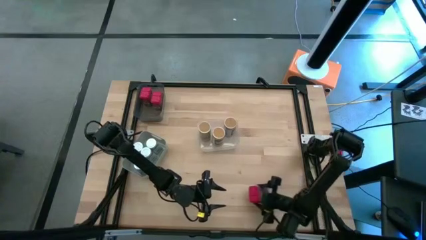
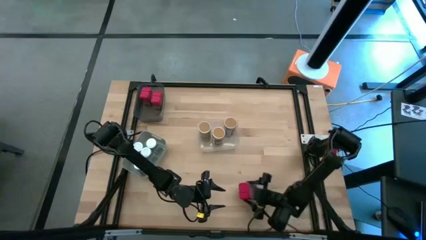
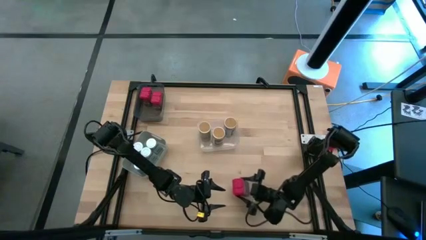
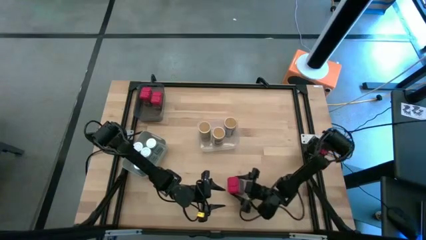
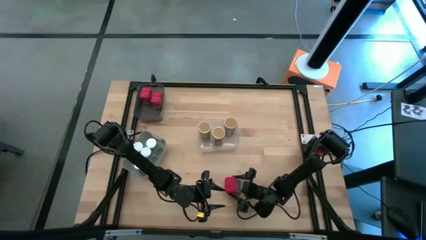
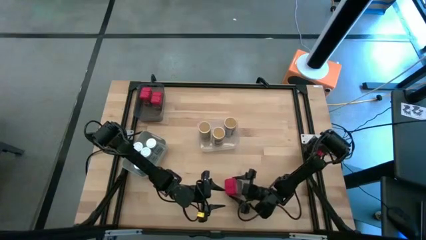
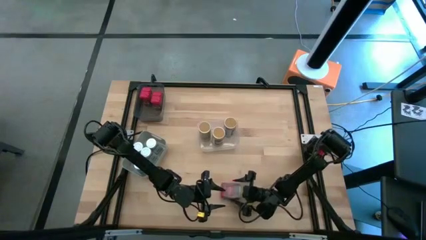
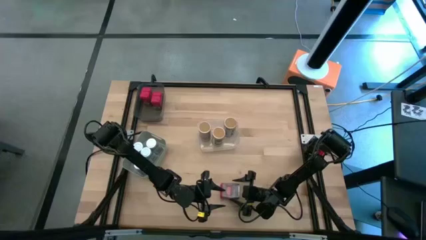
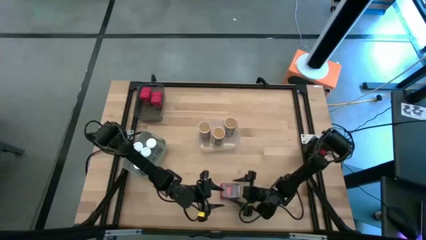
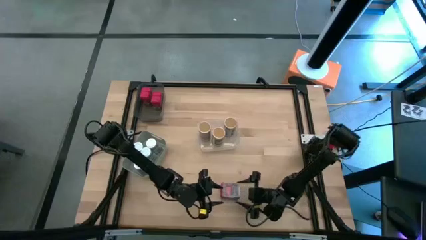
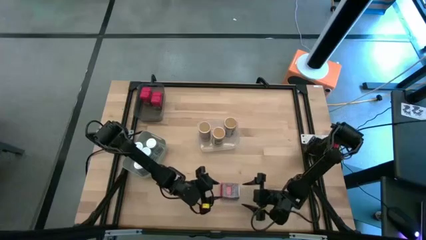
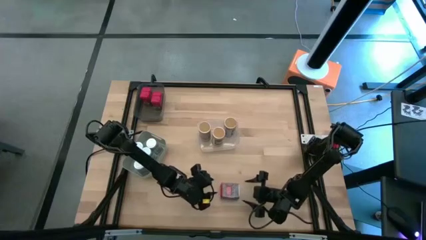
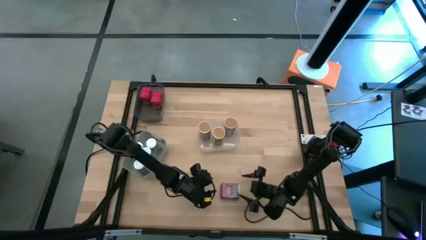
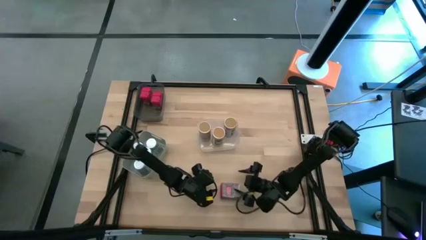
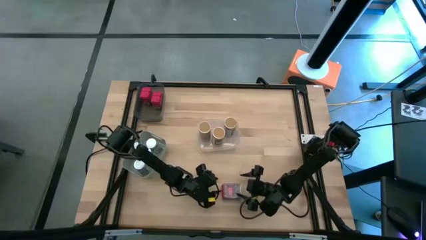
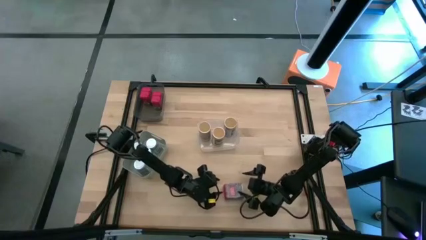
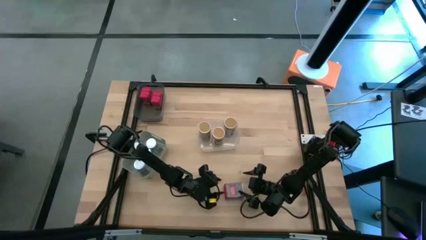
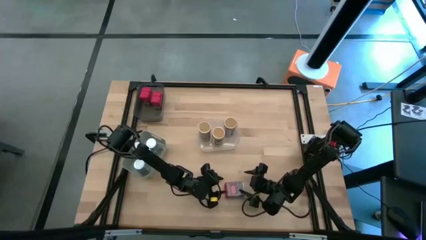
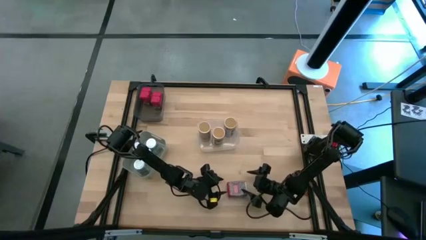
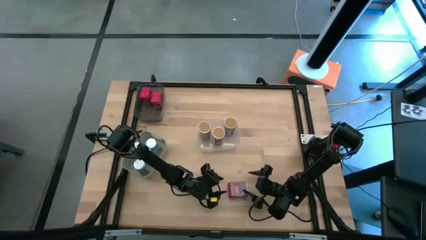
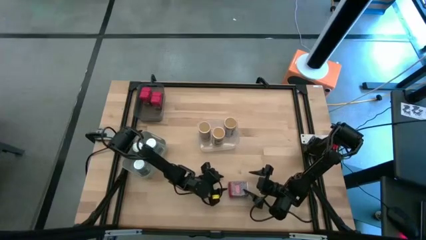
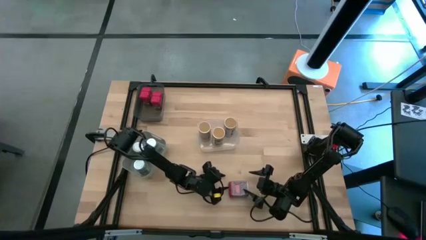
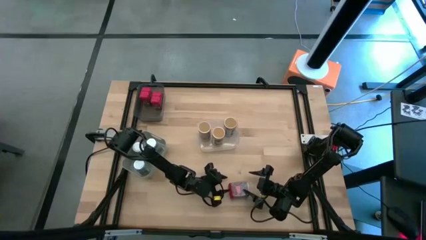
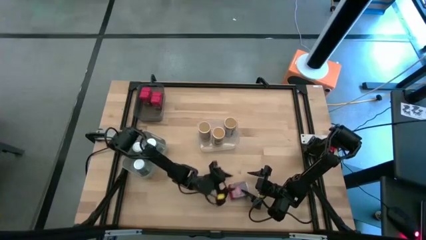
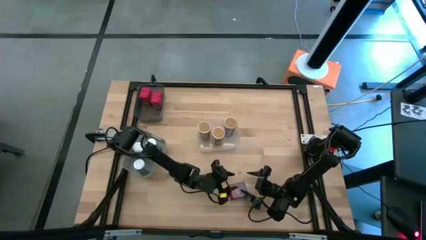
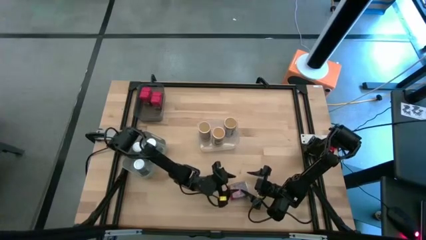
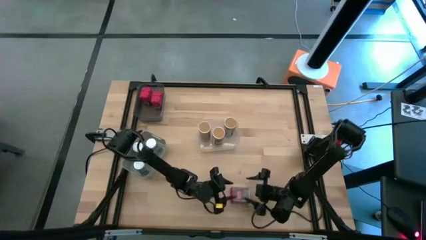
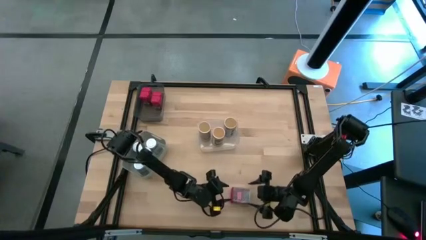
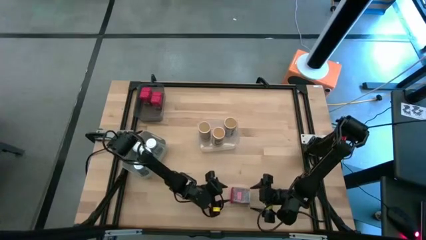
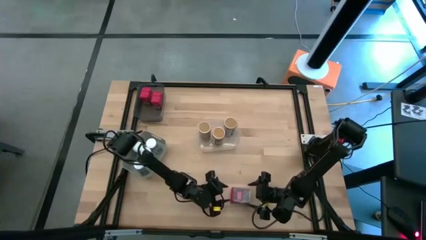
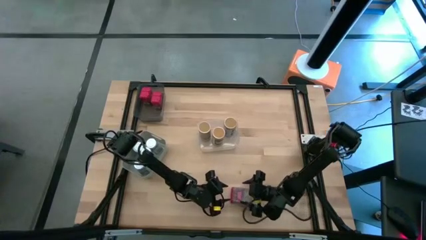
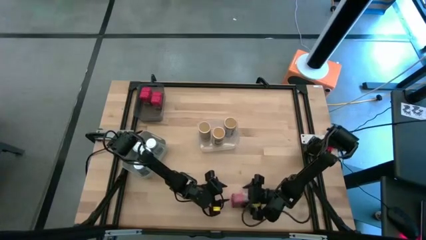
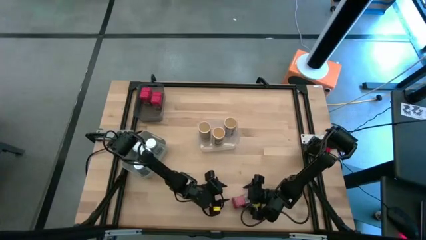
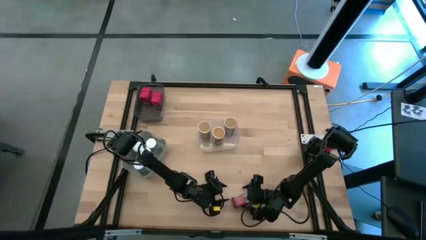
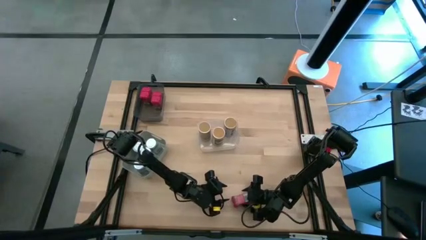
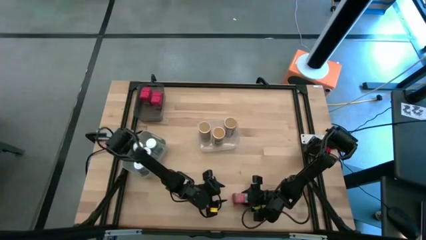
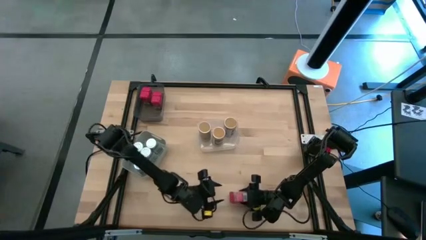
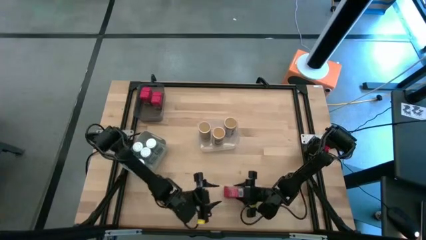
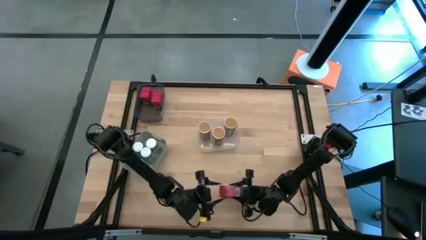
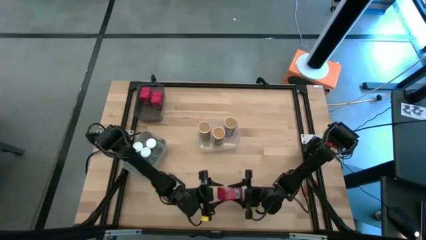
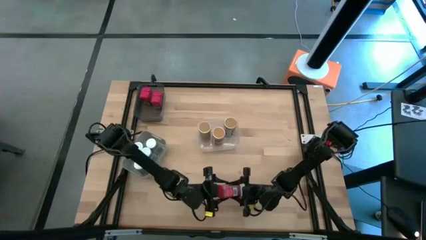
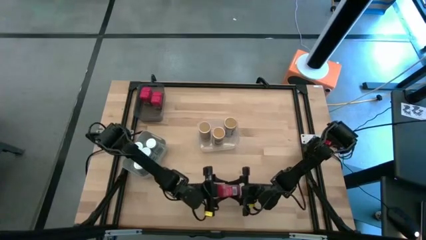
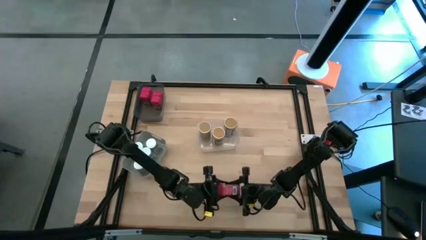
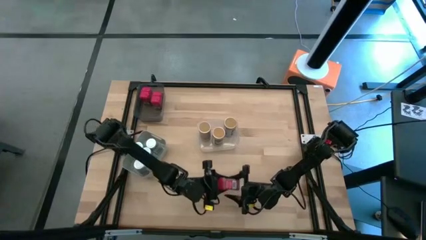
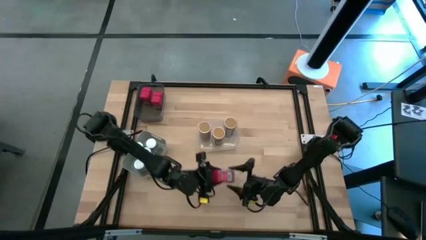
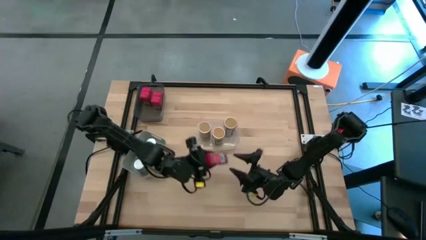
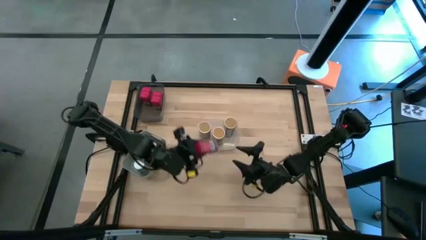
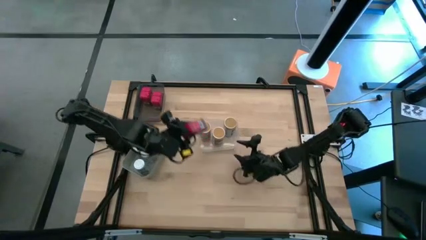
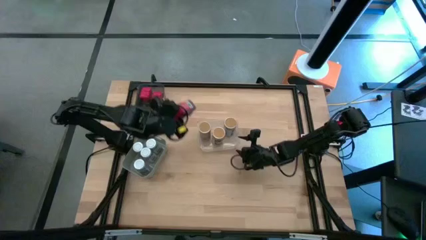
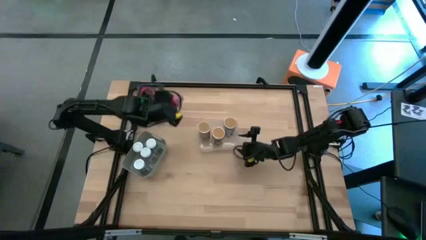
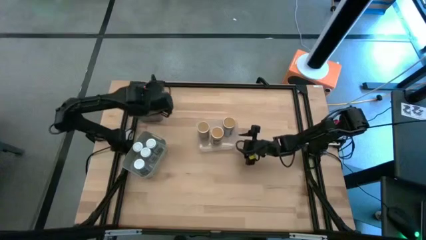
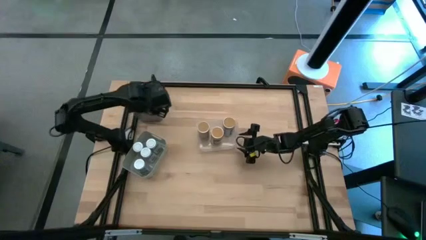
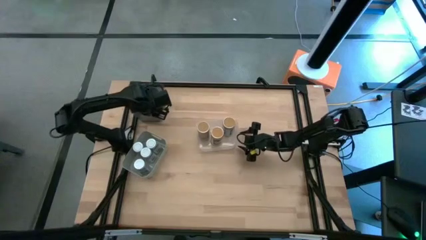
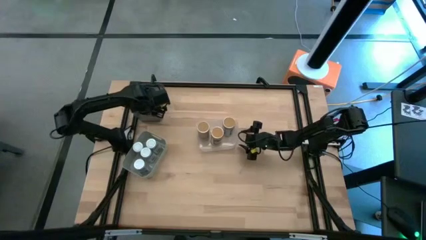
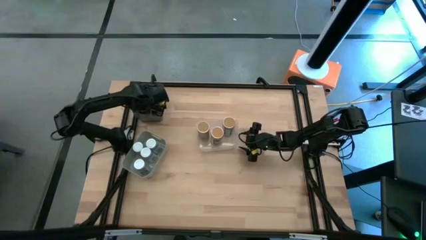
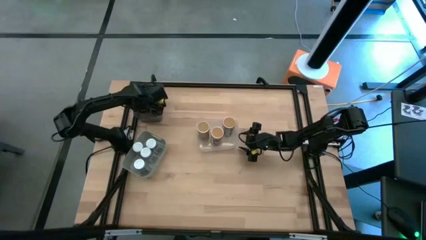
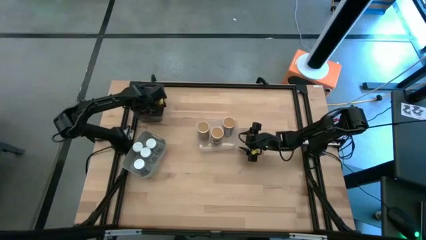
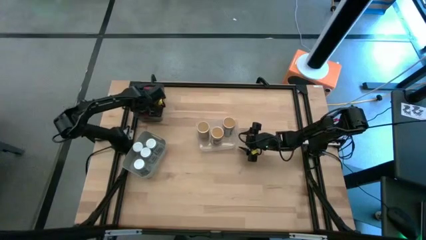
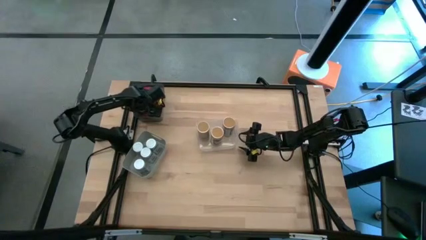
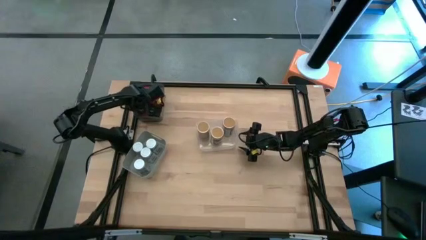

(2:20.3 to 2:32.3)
Task: Sort spices by type
Put the red seasoning can into the black bin

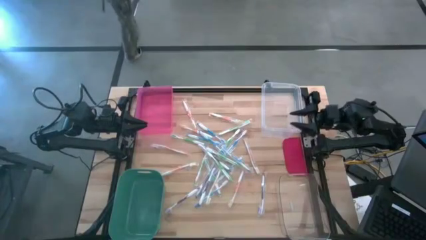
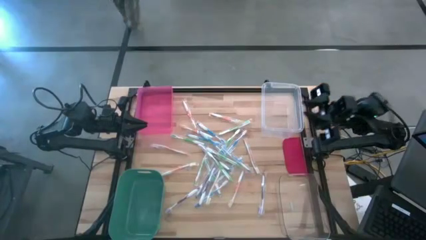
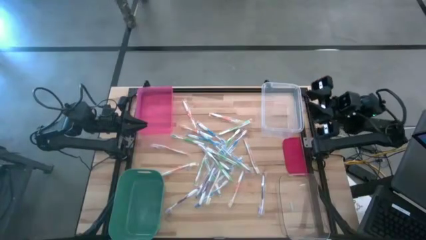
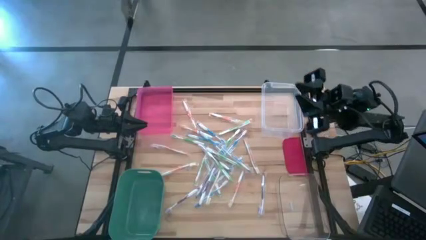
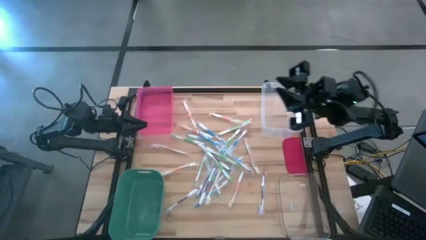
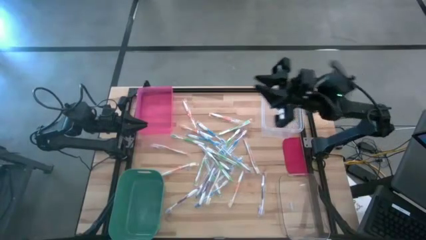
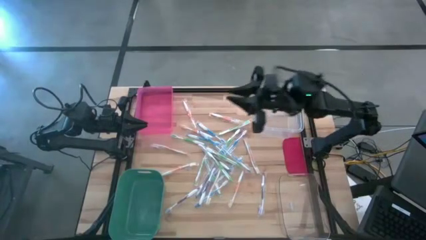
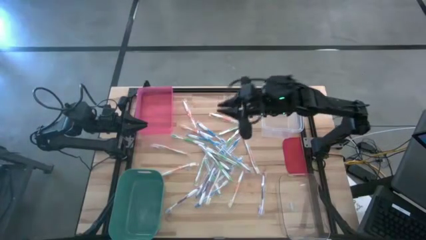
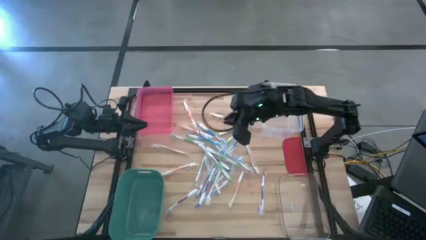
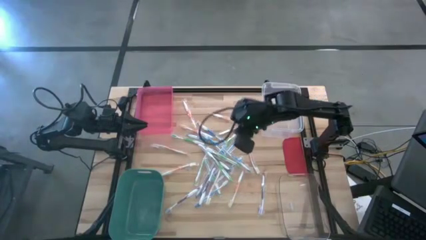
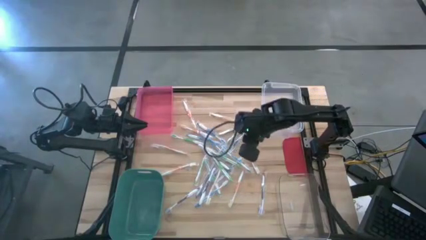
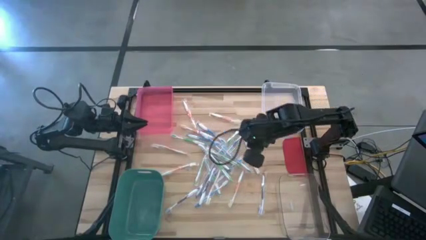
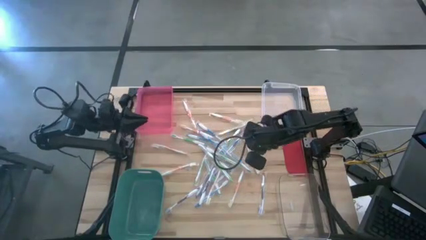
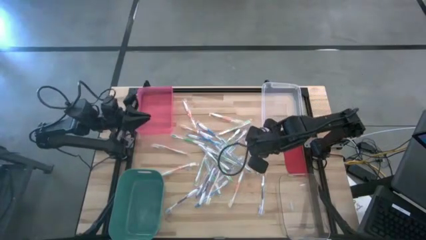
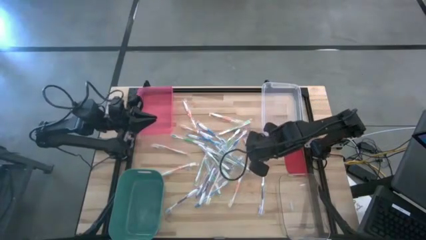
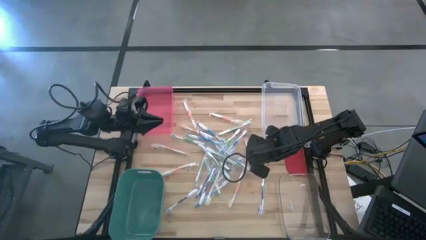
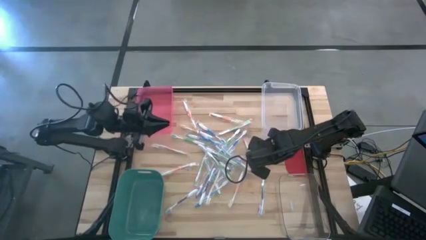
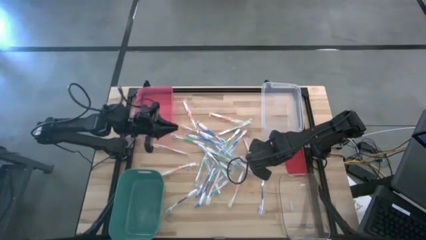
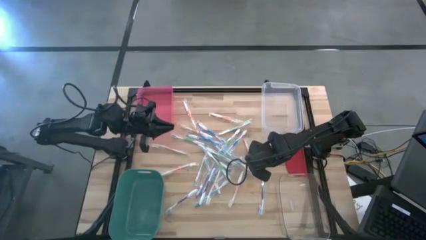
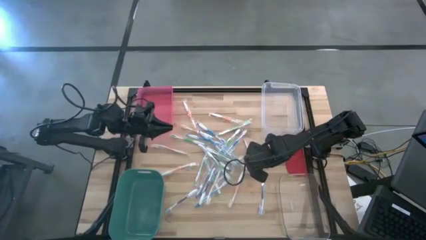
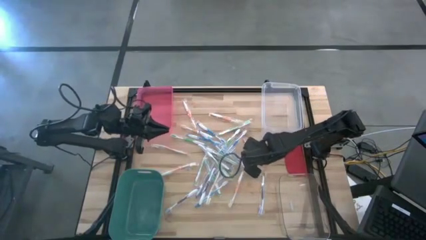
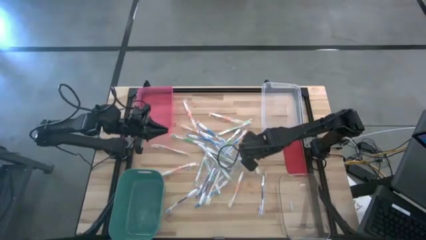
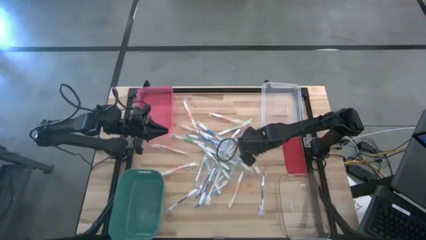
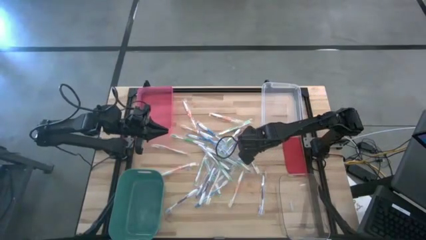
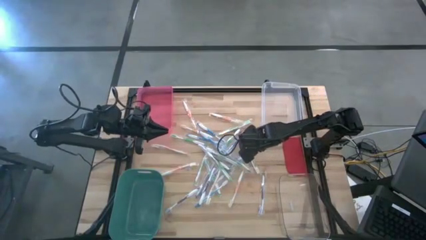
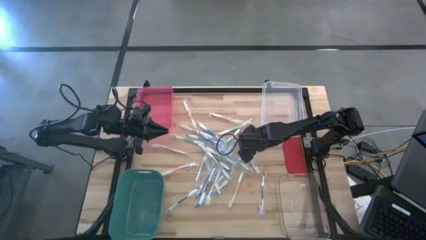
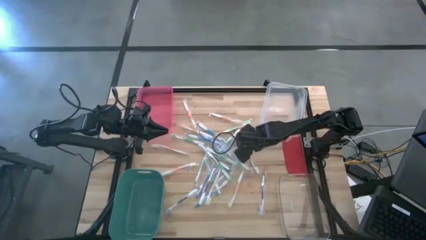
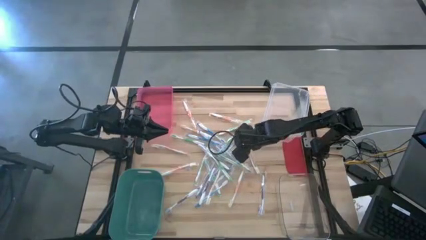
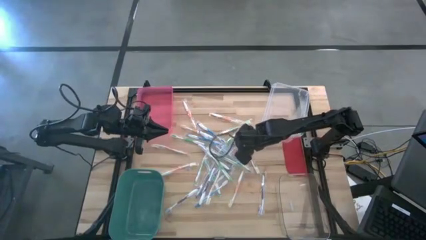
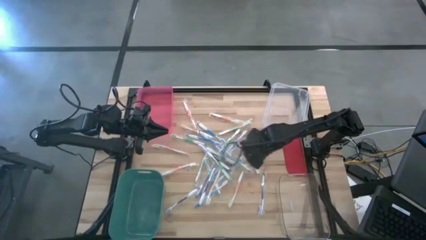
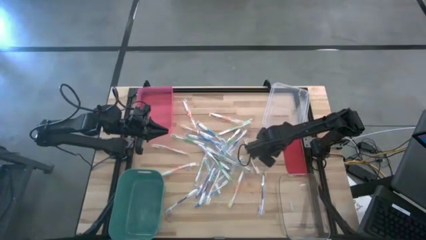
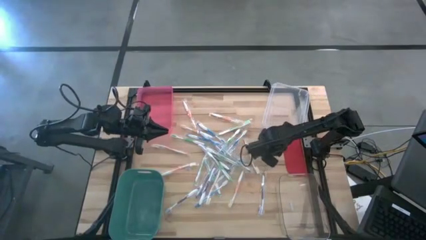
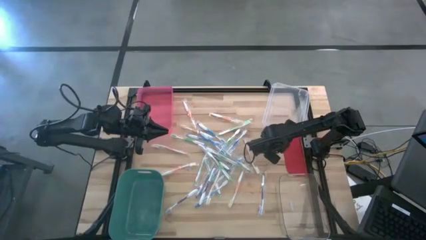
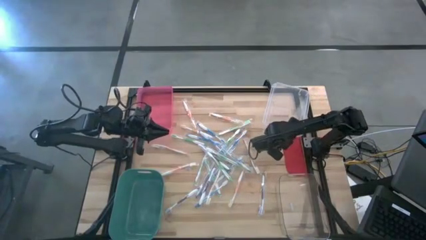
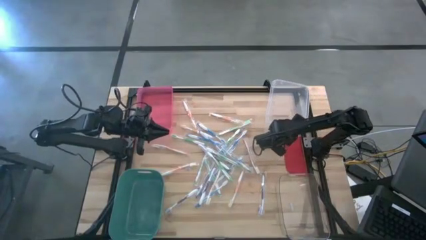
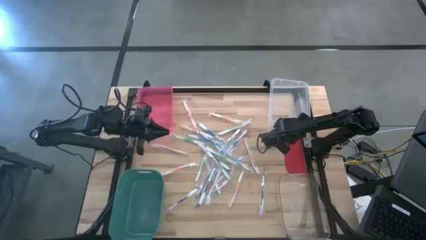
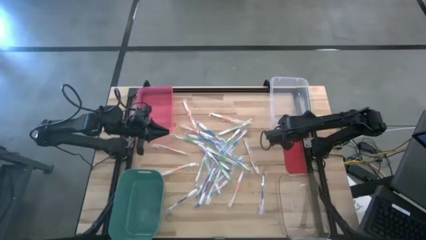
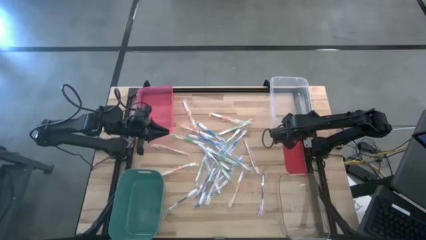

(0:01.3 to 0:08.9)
Task: Pick & Place Toothbrushes
Adjust the top transparent bin
